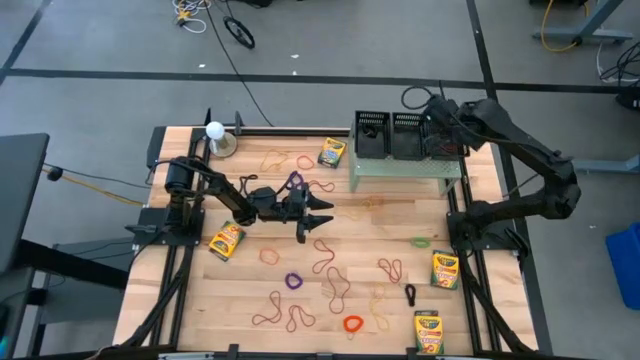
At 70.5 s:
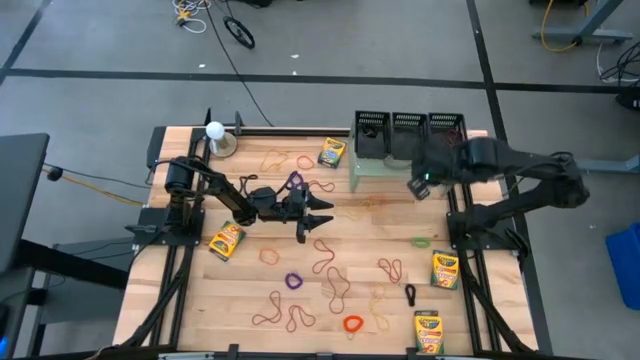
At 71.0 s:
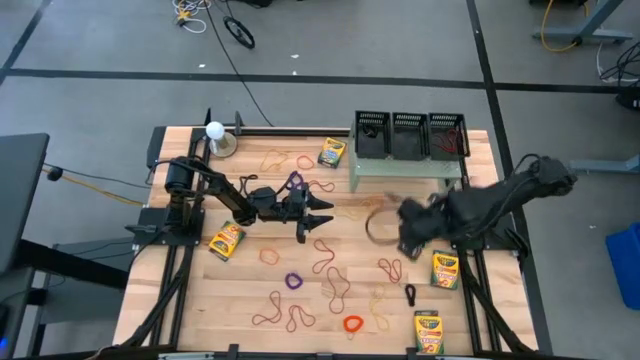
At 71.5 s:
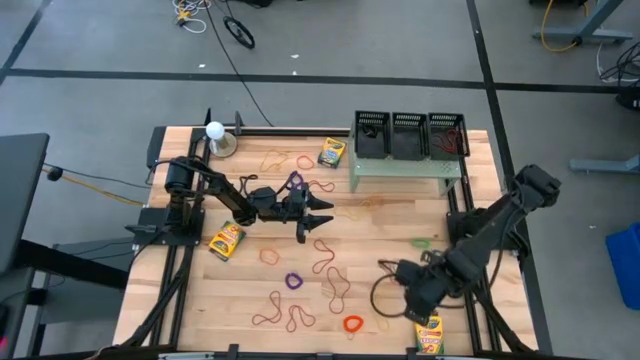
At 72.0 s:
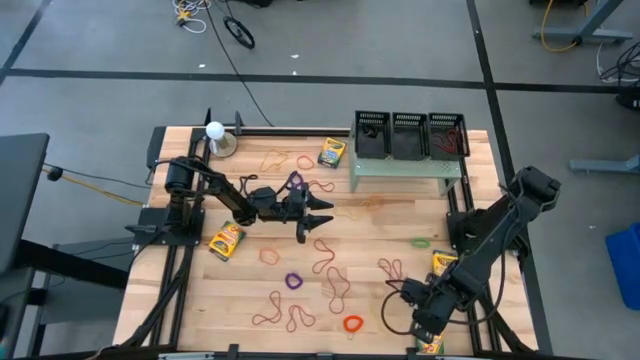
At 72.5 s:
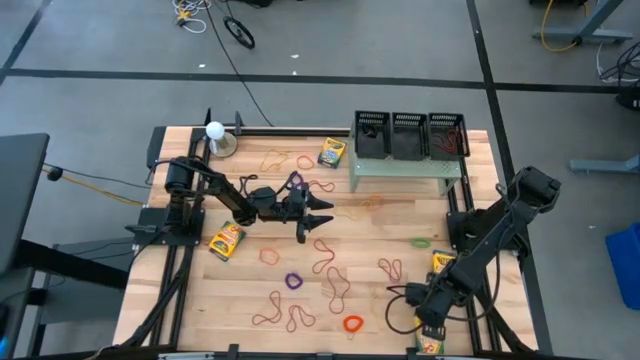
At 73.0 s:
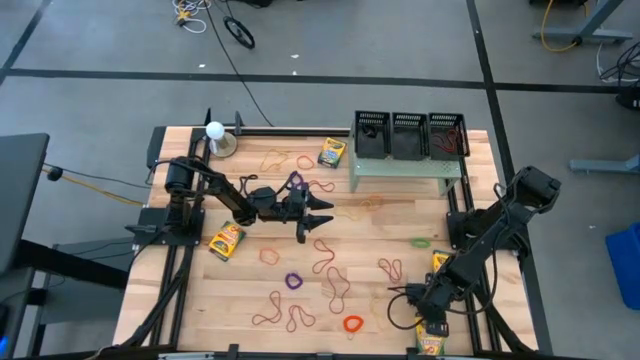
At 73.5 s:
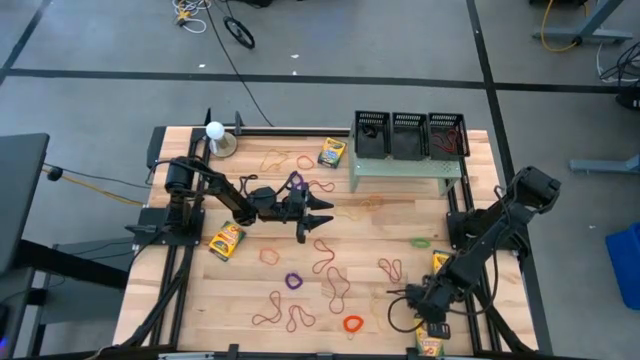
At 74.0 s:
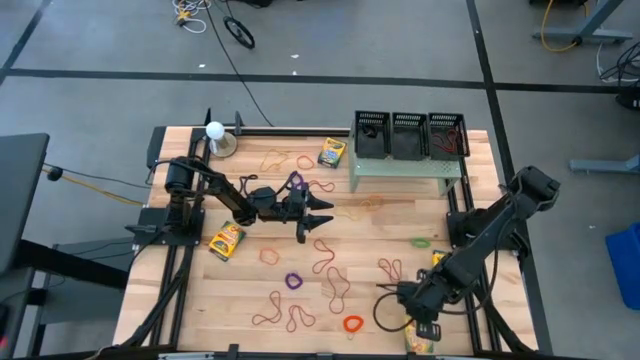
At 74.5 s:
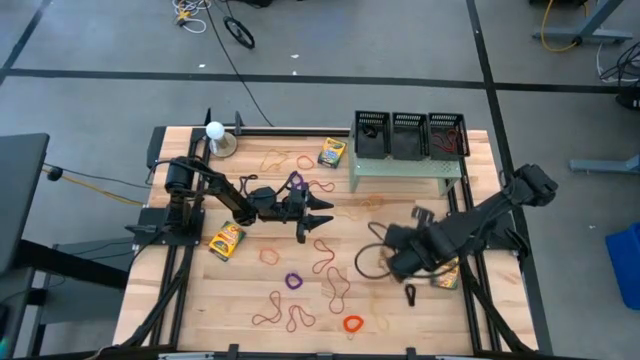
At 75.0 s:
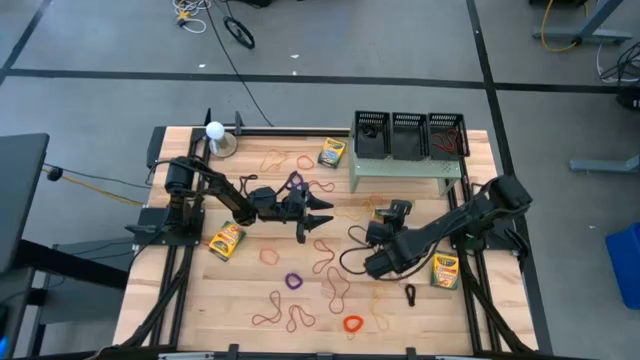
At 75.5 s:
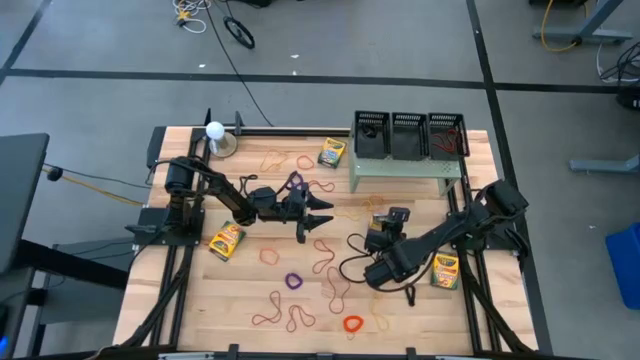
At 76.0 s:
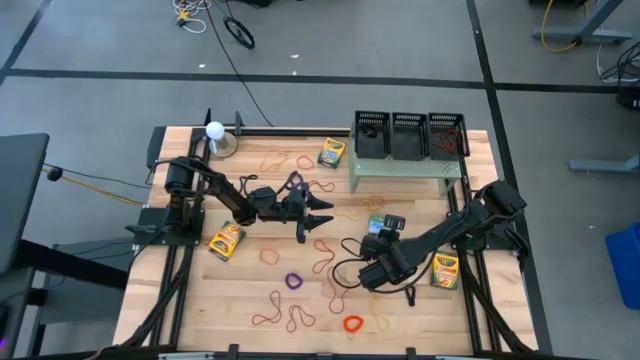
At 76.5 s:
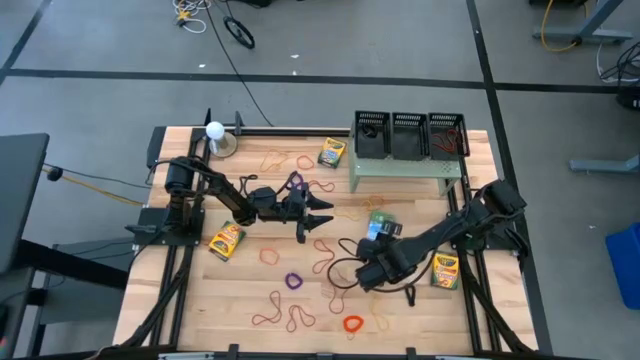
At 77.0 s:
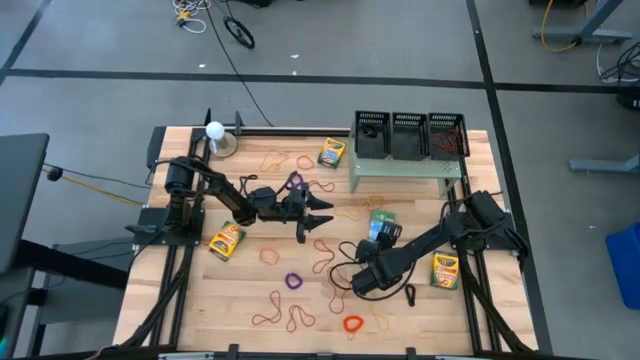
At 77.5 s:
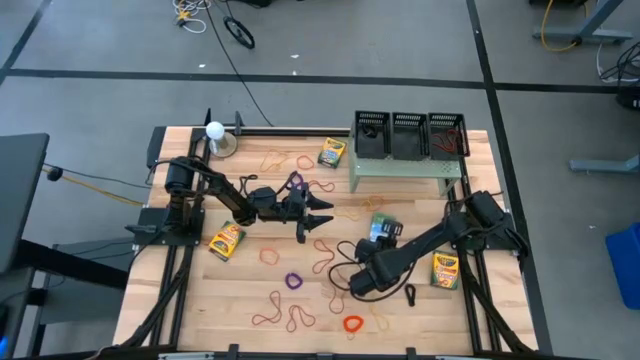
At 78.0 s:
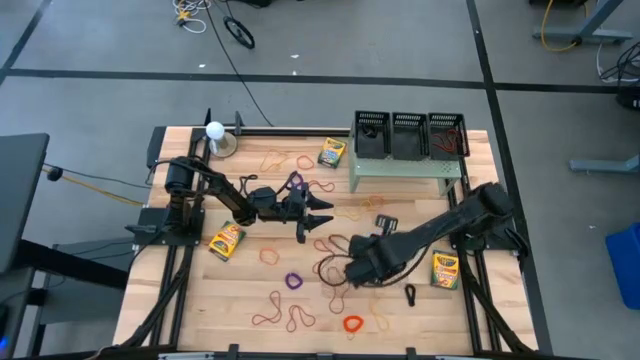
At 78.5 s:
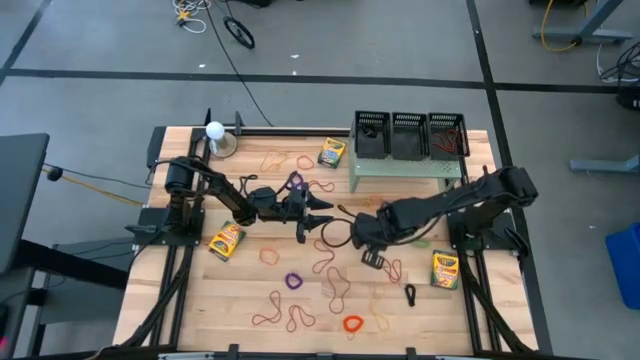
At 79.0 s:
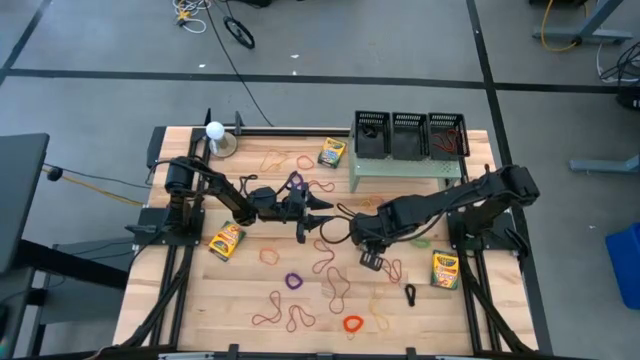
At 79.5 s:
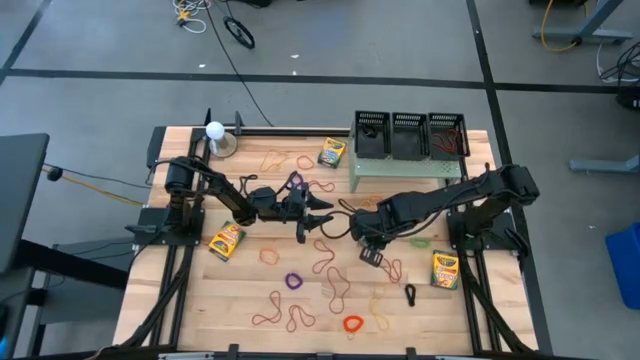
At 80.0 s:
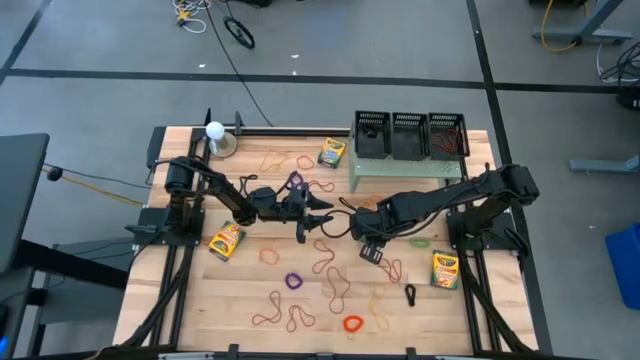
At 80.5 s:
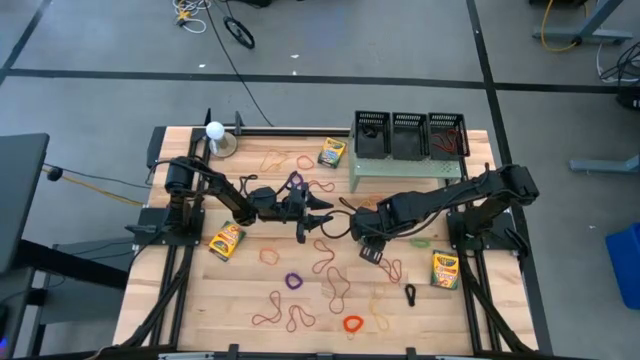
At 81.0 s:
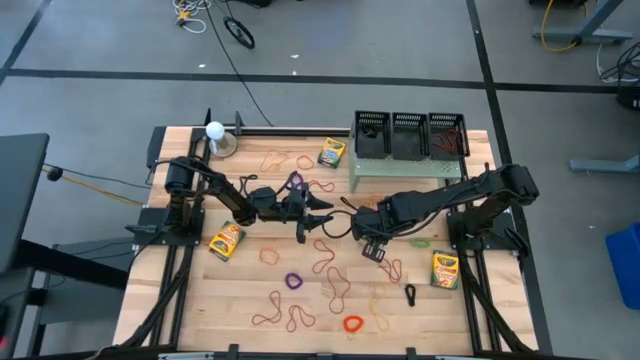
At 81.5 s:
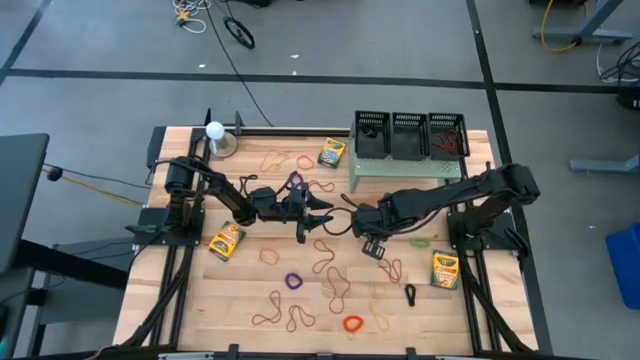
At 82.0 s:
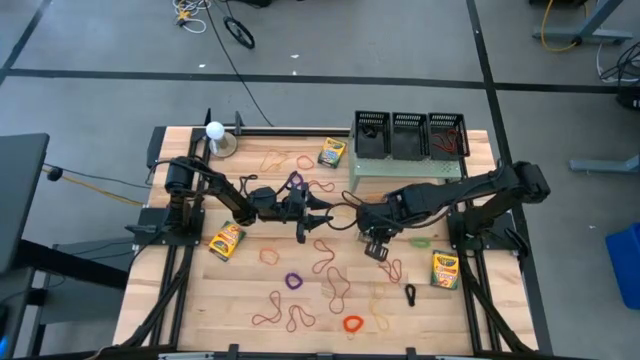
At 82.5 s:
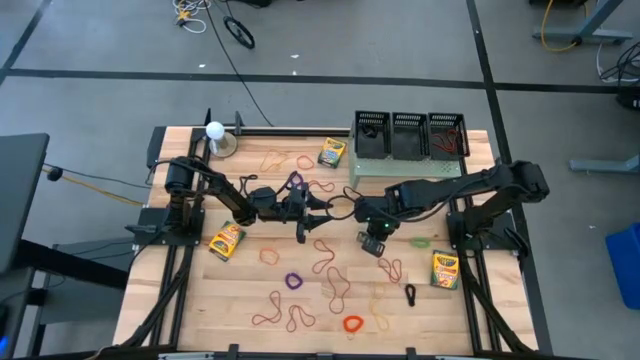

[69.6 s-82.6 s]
Task: Pick & Place Office Desk Supplies
Put the yellow crayon box into the middle black basket on the shelf

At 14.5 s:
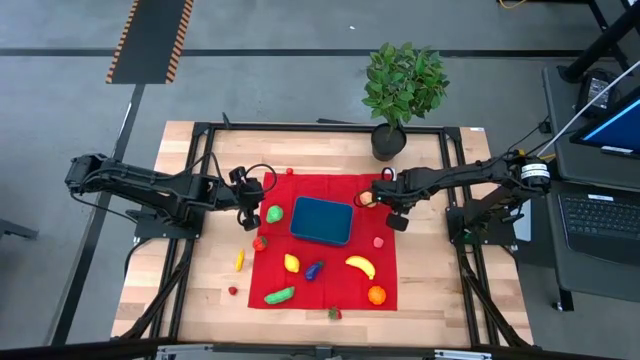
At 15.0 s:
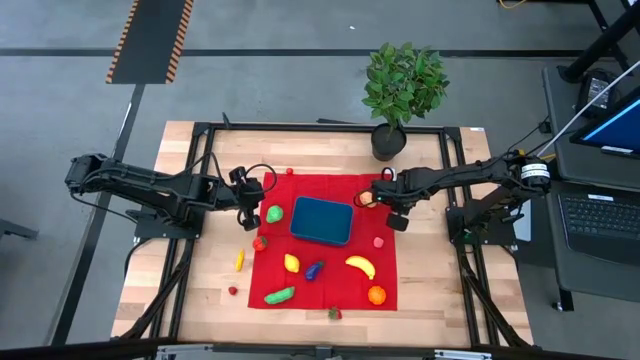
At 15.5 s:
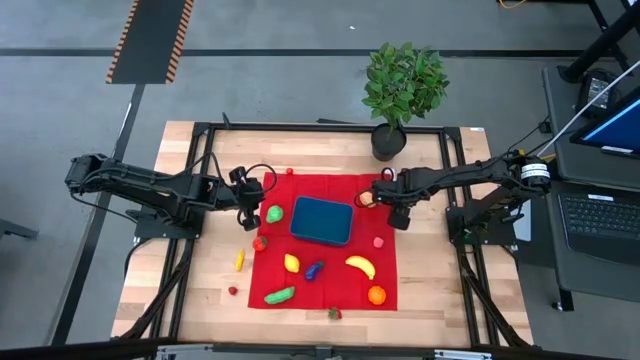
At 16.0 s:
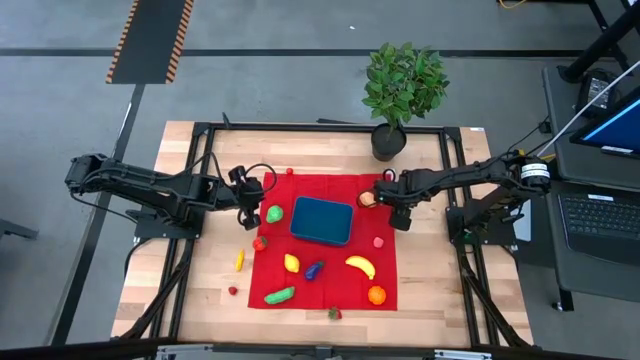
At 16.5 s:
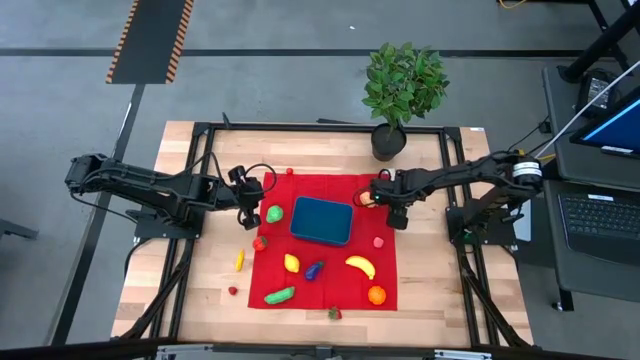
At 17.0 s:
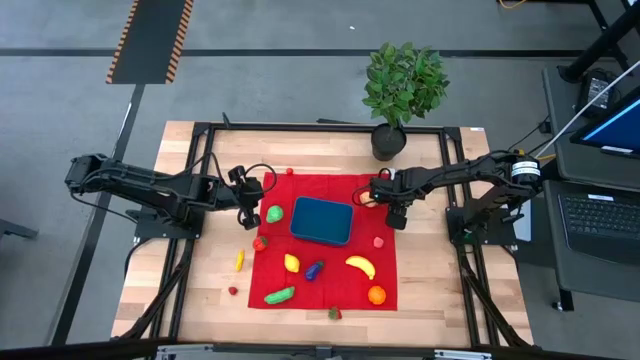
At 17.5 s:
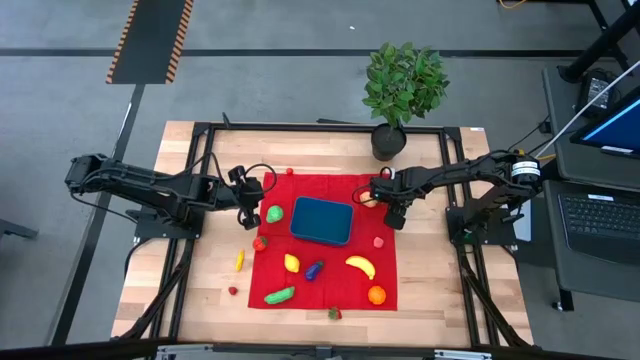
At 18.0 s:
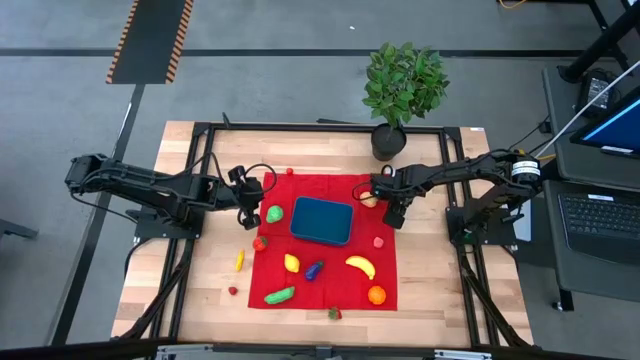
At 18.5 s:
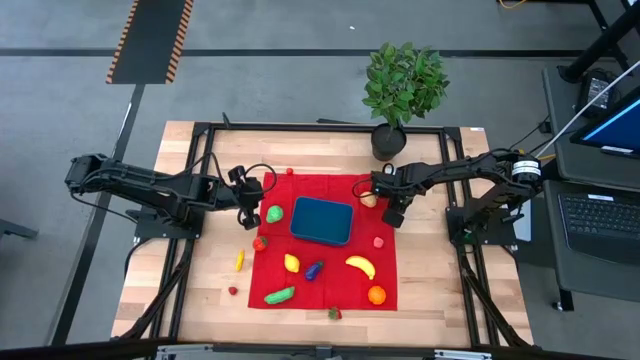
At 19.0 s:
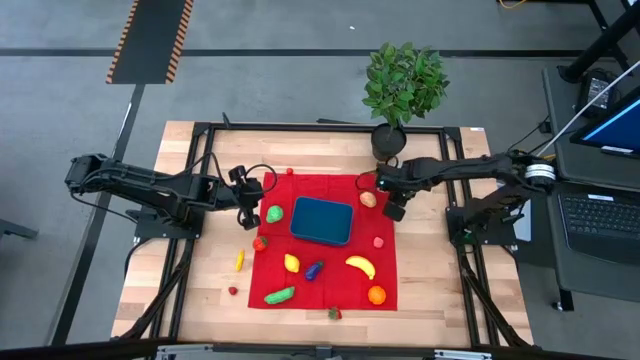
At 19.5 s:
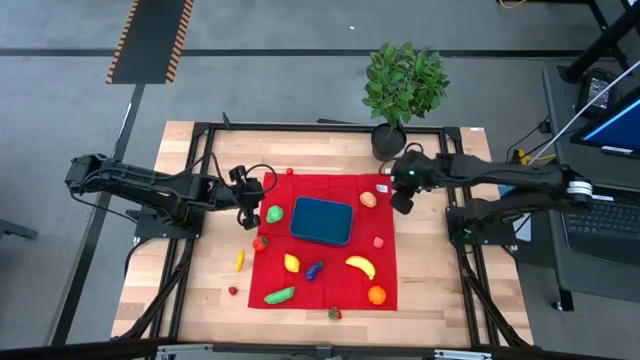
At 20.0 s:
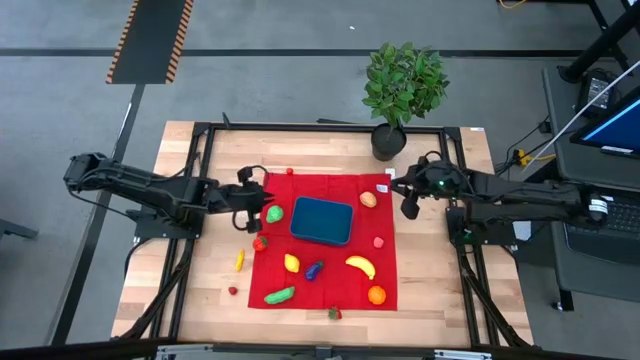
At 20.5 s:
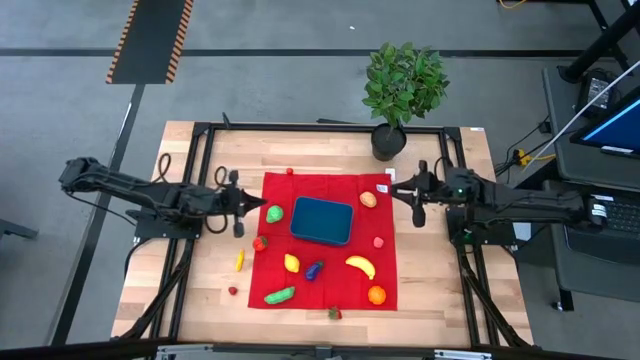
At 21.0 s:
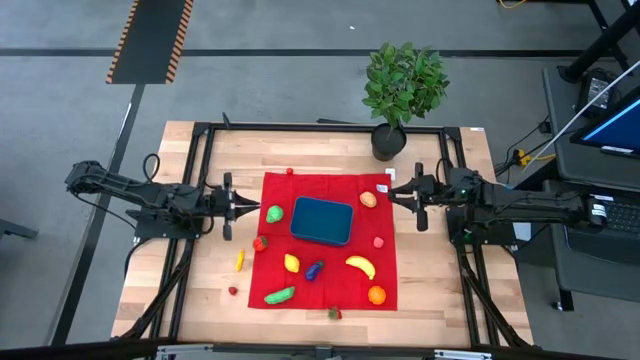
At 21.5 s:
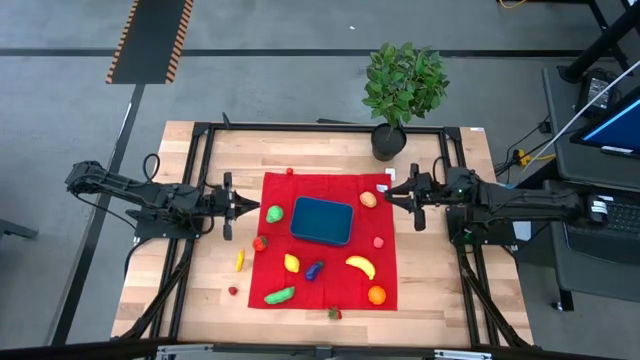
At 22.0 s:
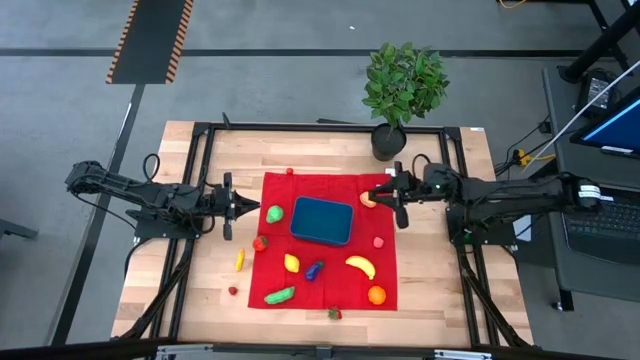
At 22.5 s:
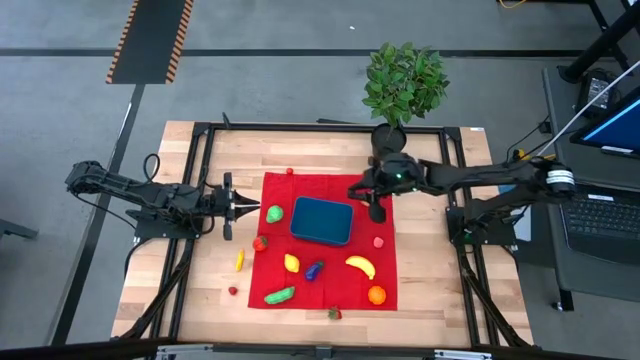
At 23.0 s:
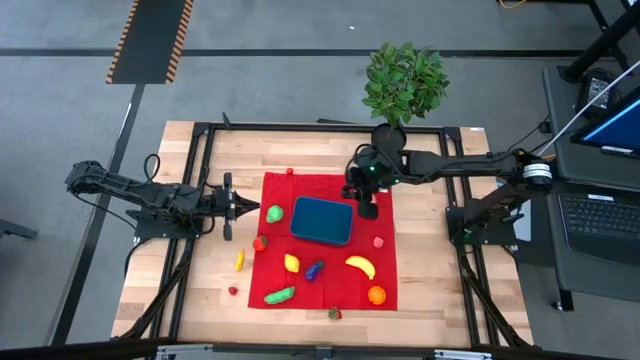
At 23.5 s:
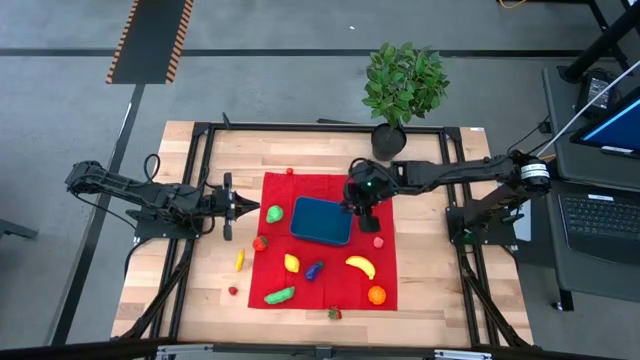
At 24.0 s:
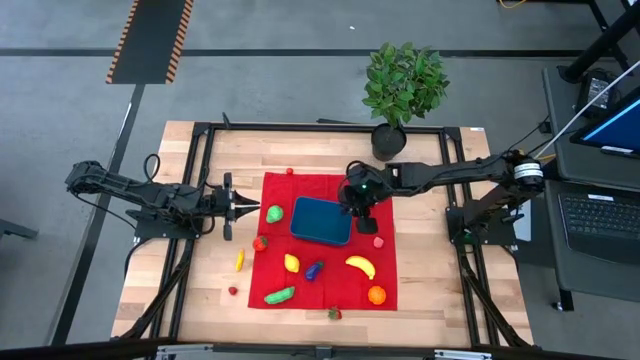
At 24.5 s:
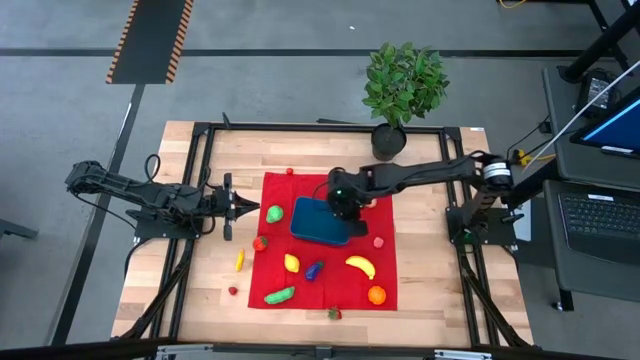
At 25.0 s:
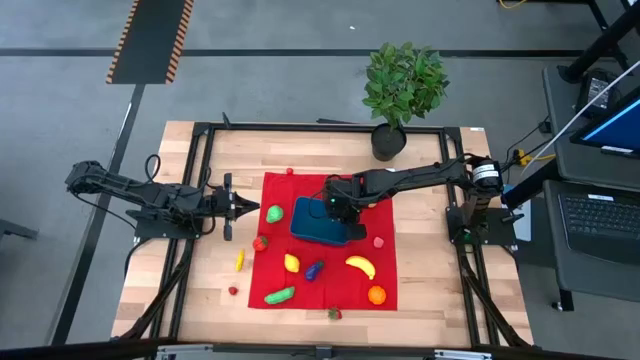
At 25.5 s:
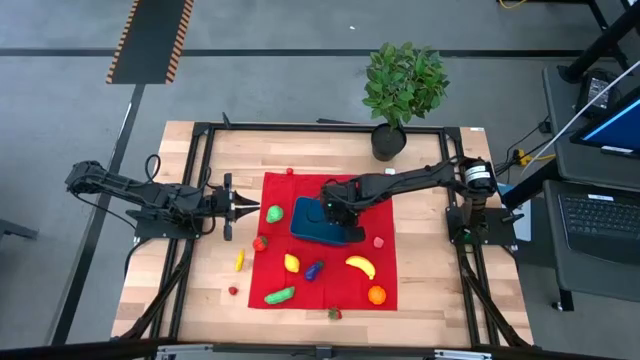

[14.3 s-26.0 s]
Task: Pick and placing Produce into tupperware
Put the blackberry into the blue bin
